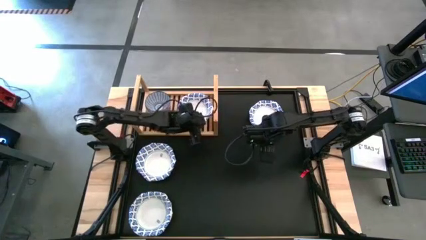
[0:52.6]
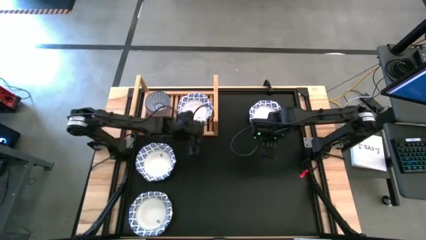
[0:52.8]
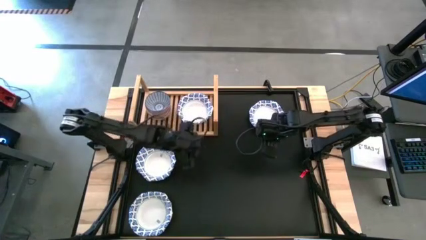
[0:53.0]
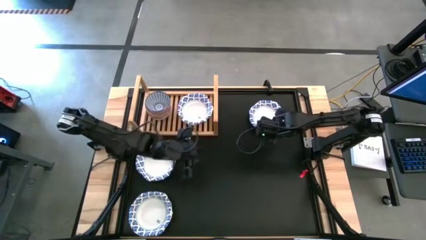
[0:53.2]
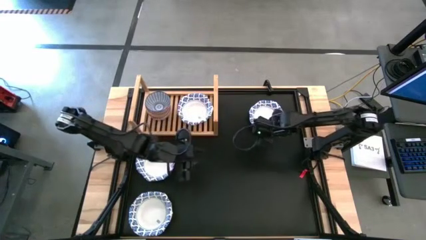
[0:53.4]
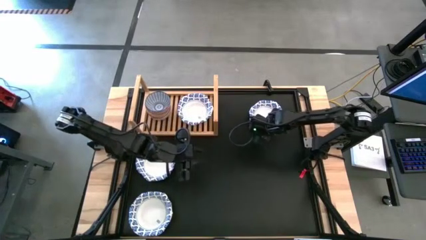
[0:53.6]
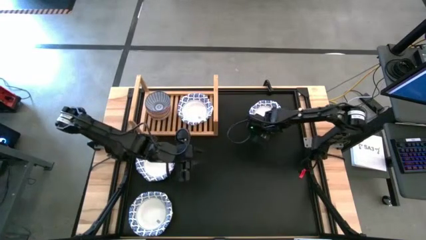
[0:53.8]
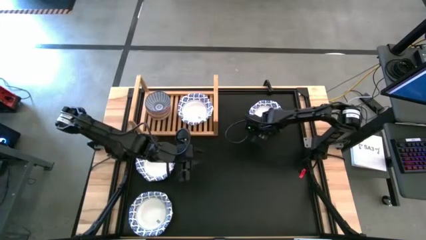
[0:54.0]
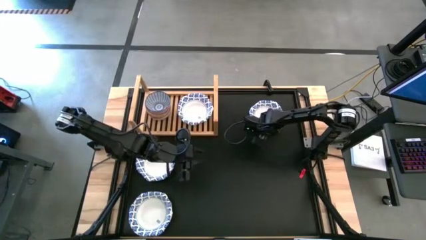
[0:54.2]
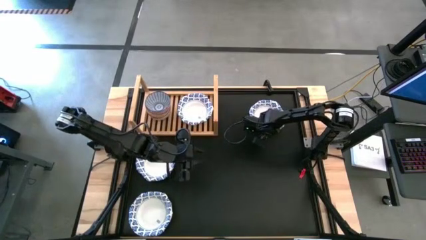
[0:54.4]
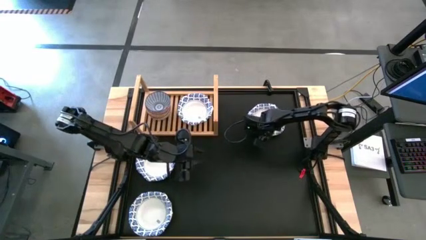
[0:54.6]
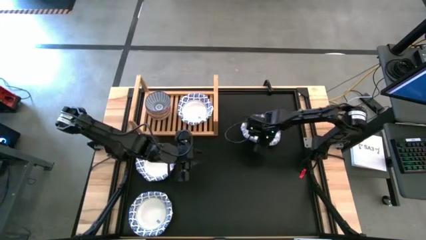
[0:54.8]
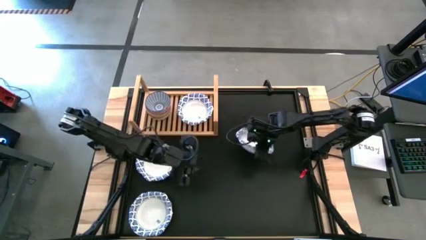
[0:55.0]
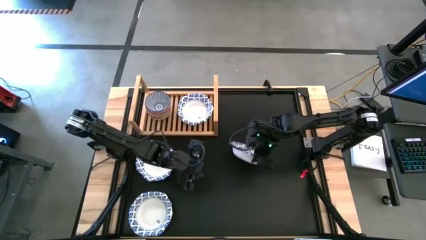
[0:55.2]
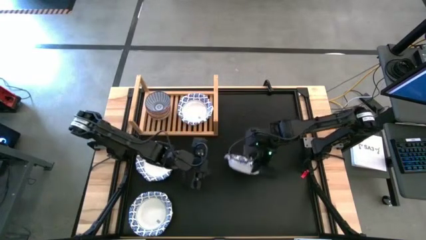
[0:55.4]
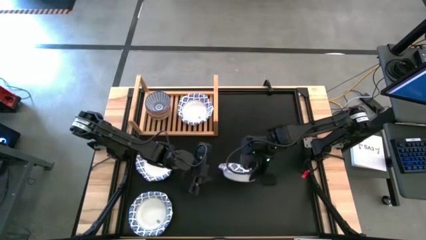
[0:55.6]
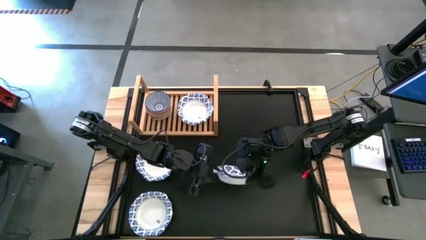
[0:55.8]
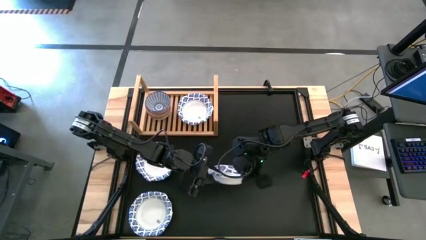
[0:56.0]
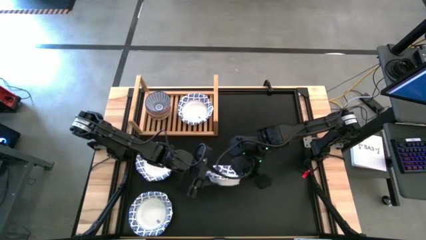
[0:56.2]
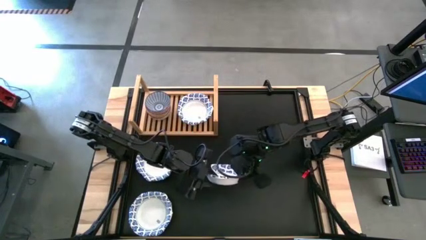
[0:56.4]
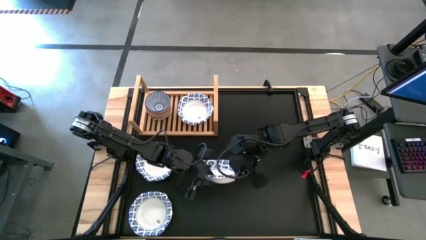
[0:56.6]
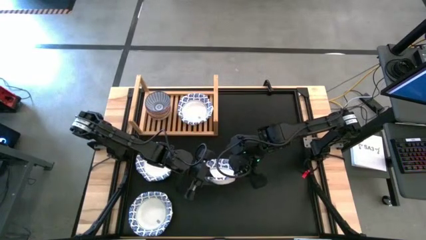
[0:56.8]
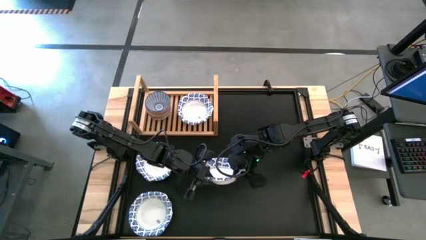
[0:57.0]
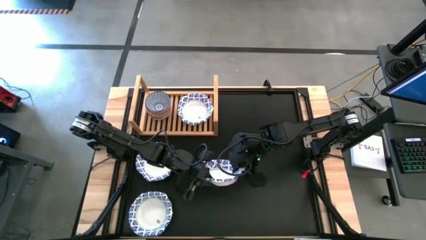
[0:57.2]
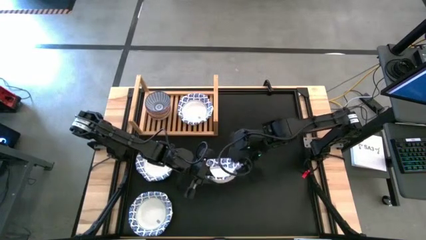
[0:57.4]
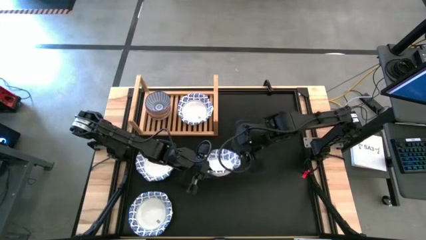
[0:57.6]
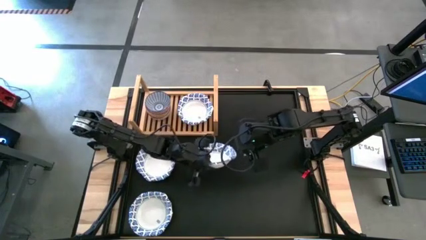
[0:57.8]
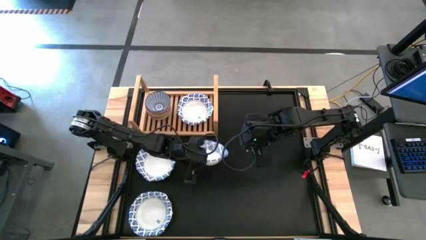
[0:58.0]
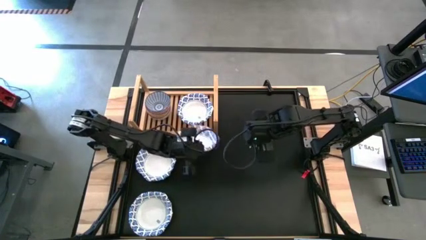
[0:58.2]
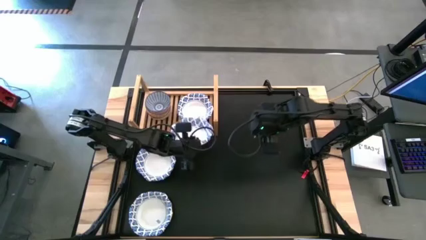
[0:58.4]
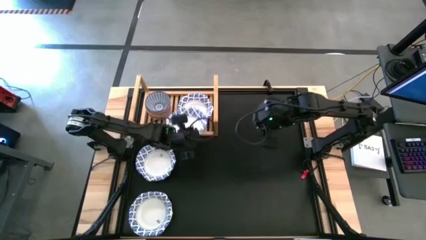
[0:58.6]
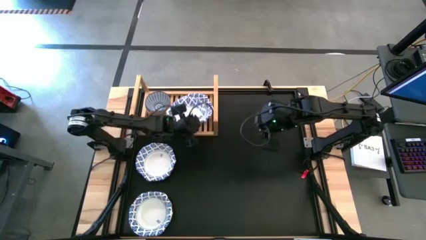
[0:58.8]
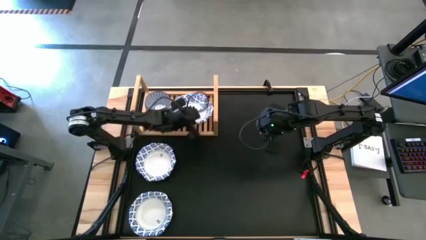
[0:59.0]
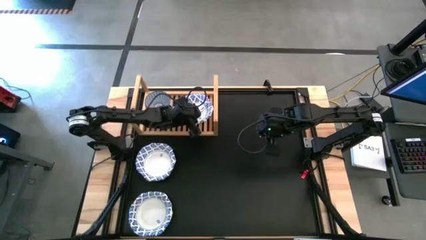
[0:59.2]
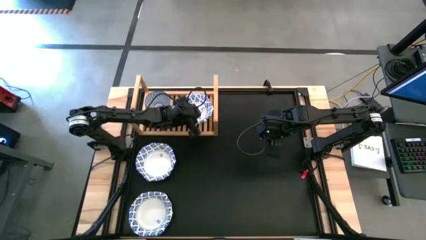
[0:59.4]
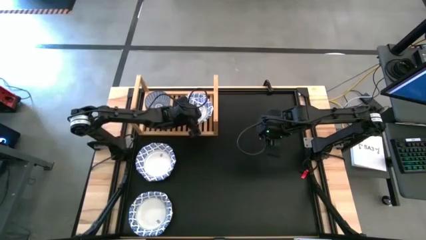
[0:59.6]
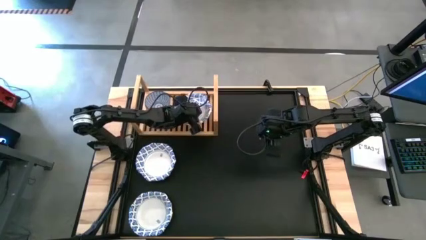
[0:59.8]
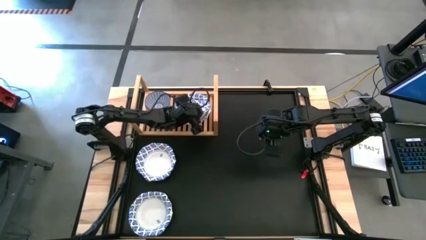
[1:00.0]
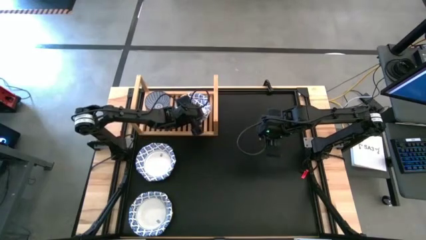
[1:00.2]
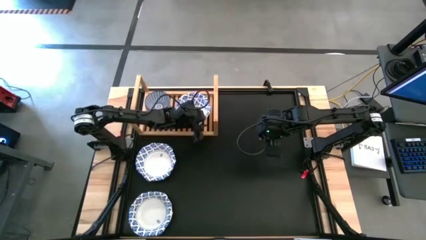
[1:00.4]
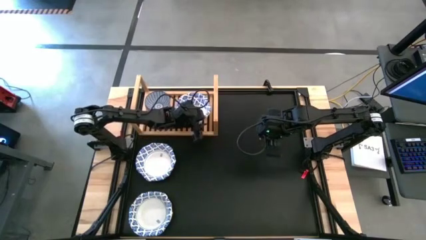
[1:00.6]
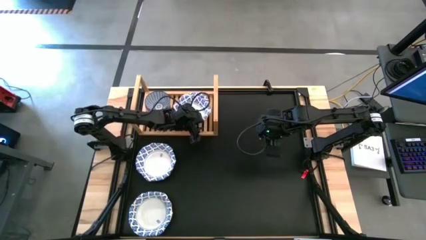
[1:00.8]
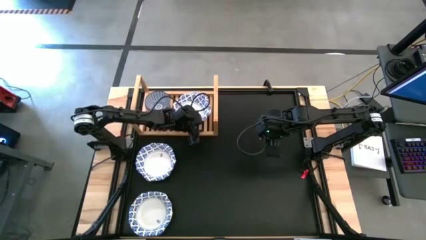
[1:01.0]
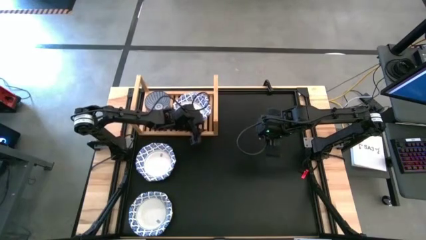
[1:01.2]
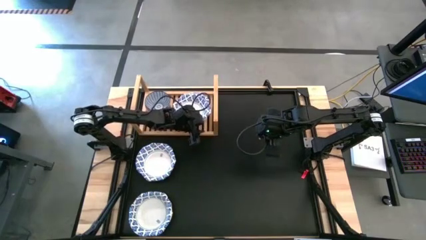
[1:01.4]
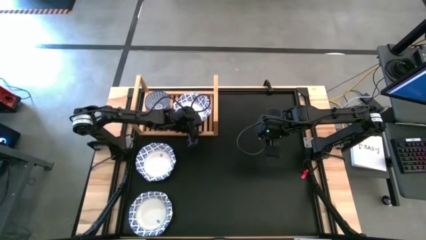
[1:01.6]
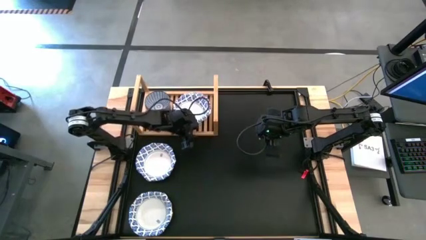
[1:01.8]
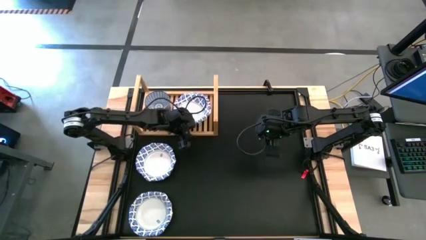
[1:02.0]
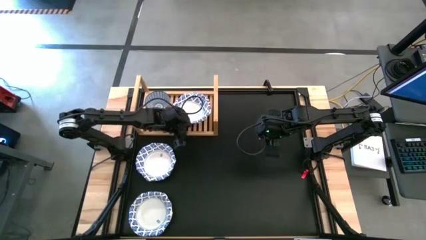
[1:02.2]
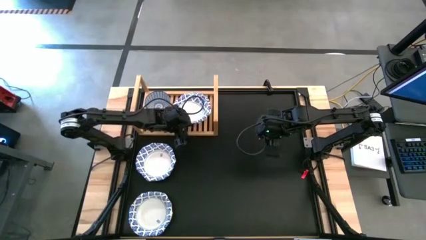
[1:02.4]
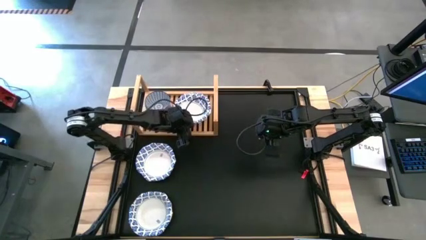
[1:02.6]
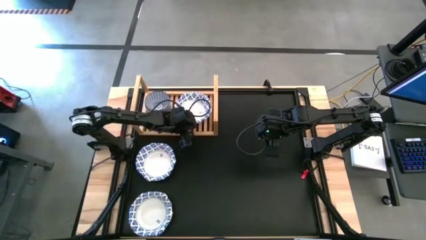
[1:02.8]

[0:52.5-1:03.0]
Task: Place and stack bowls onto a shelf
Stack the white bowl on top of the white bowl on the shelf

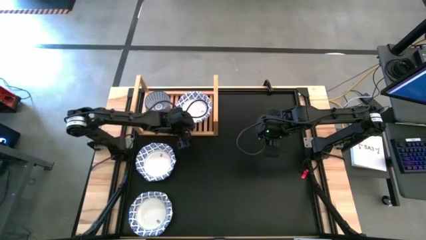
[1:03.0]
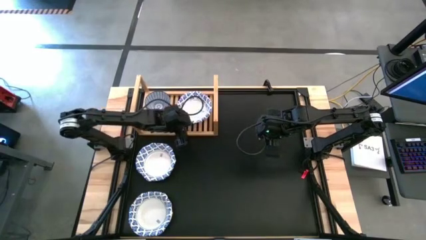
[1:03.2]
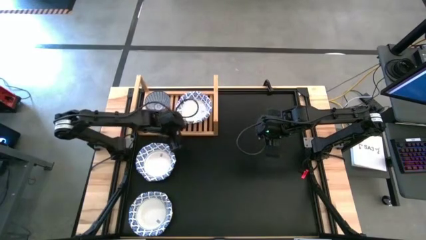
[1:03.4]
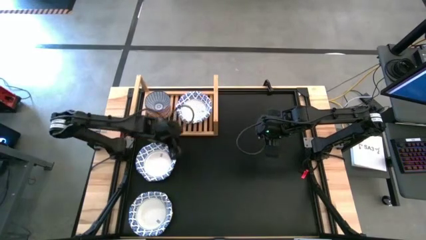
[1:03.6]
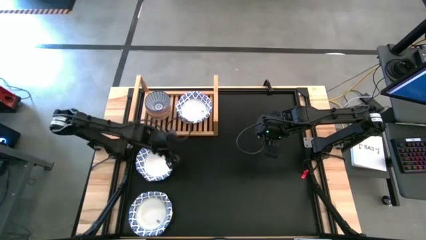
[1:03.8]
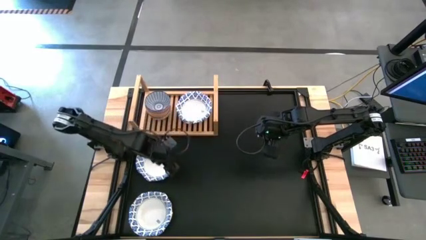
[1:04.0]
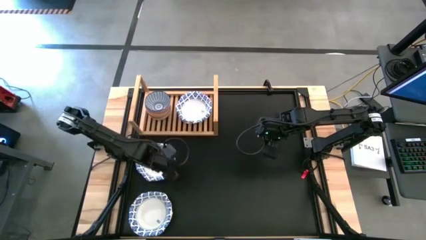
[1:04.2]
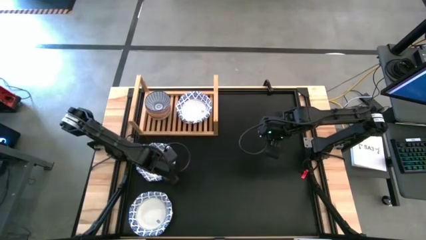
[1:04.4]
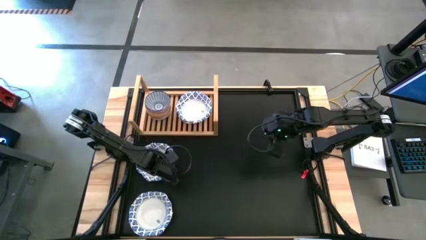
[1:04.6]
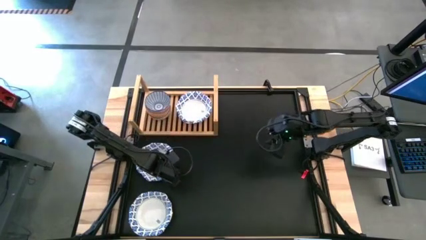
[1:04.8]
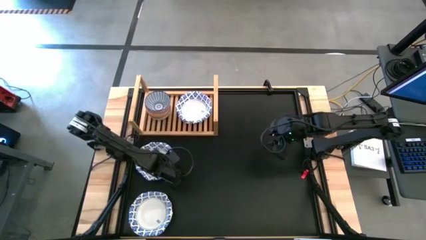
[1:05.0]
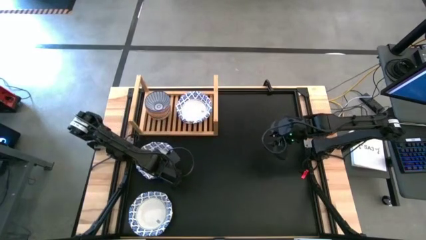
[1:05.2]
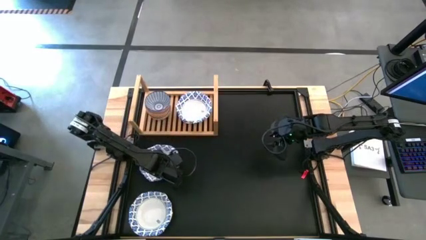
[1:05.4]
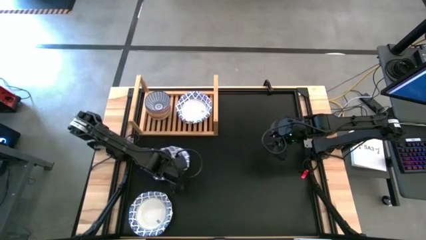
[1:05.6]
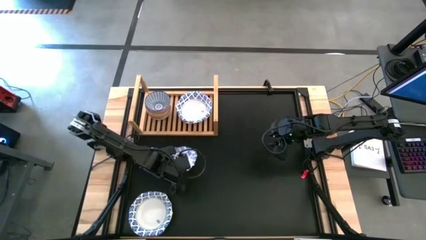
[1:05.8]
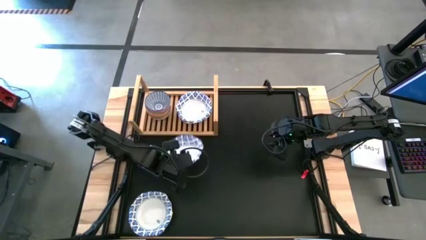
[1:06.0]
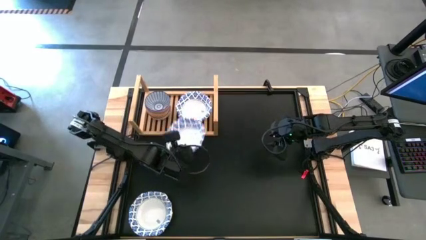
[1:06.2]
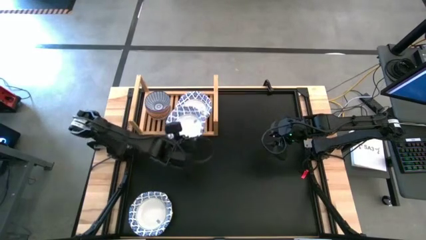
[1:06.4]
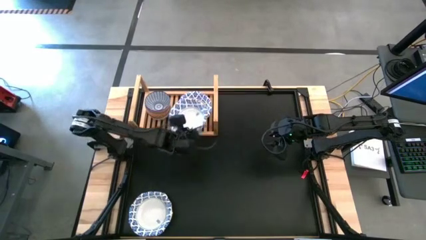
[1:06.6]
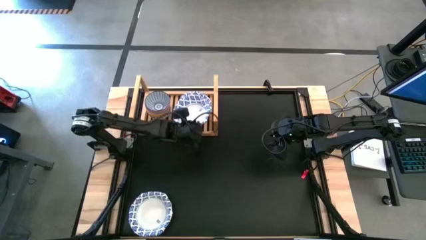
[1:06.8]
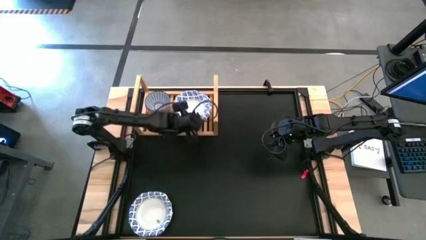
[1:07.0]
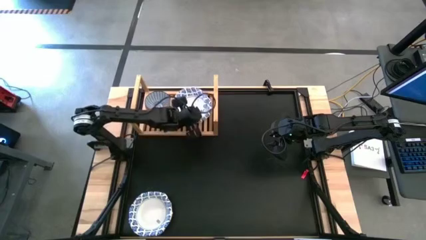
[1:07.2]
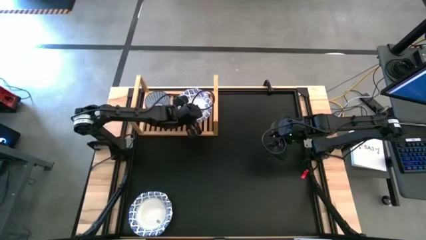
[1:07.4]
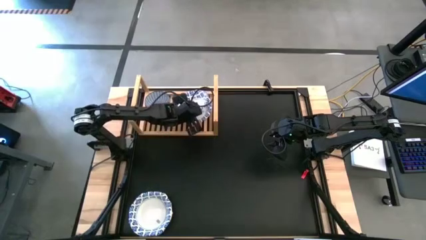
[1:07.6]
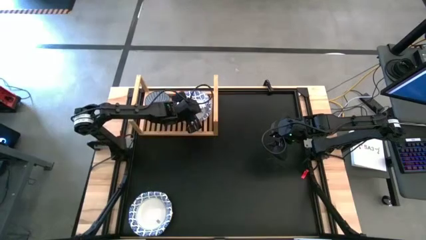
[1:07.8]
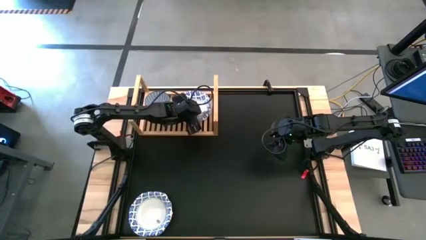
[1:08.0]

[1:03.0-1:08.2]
Stack the white bowl on top of the white bowl on the shelf
